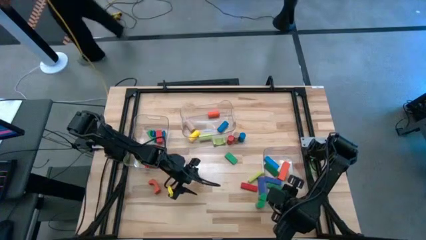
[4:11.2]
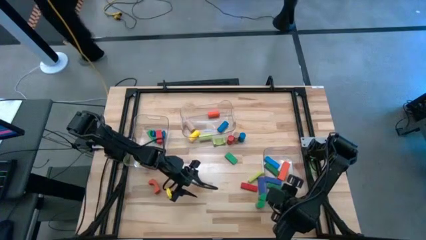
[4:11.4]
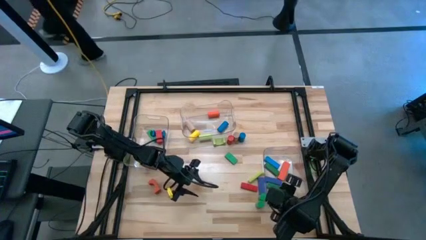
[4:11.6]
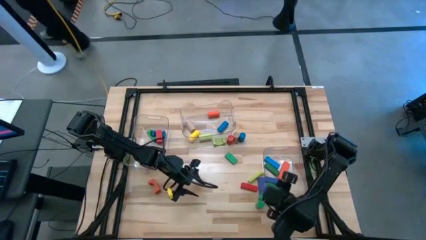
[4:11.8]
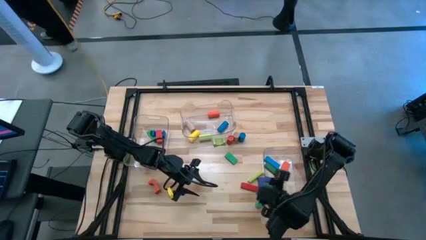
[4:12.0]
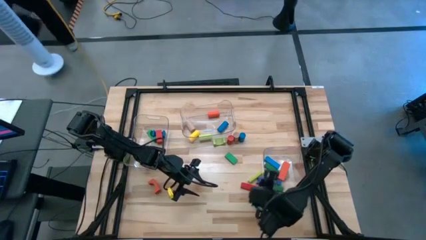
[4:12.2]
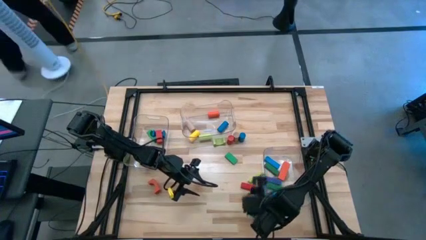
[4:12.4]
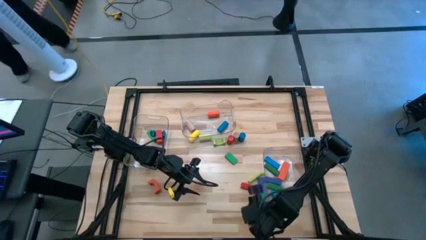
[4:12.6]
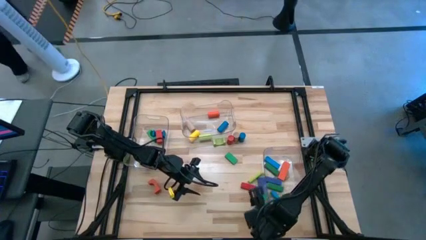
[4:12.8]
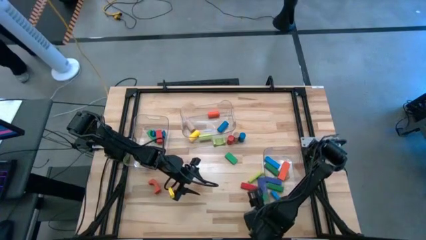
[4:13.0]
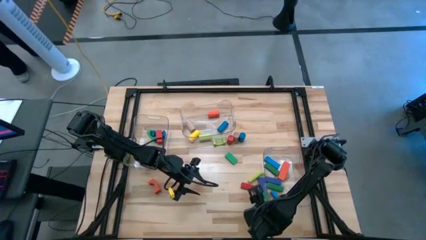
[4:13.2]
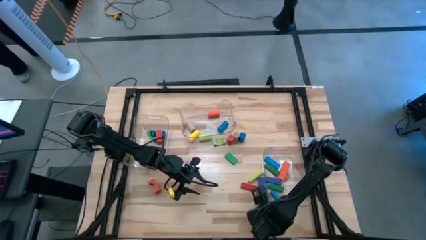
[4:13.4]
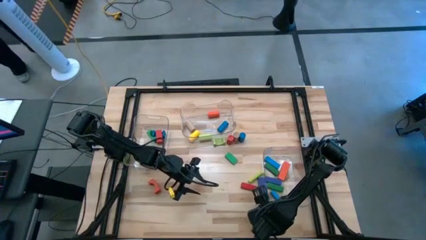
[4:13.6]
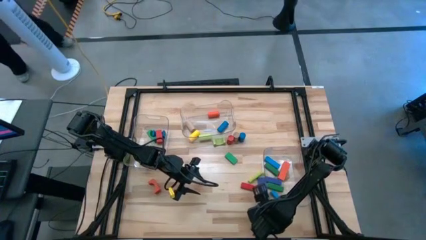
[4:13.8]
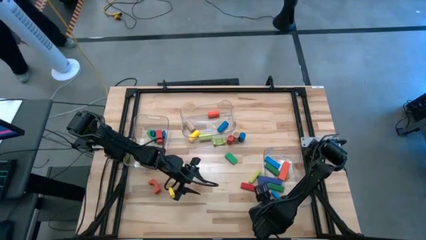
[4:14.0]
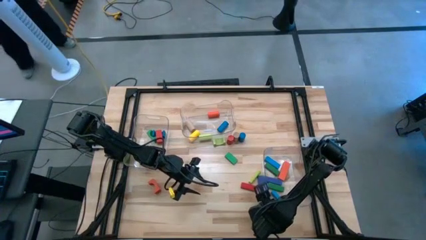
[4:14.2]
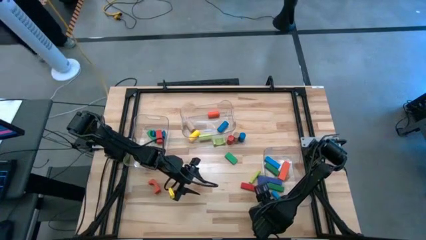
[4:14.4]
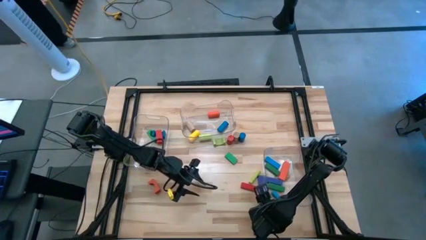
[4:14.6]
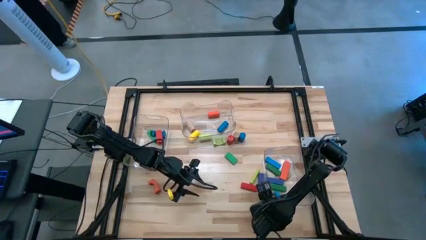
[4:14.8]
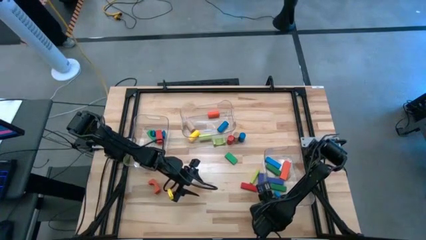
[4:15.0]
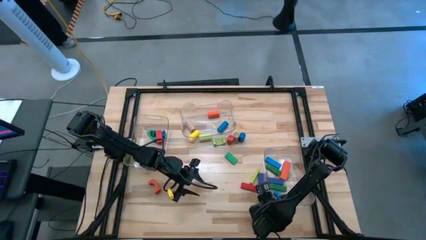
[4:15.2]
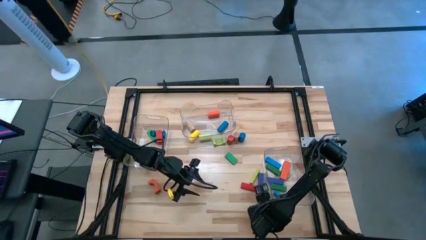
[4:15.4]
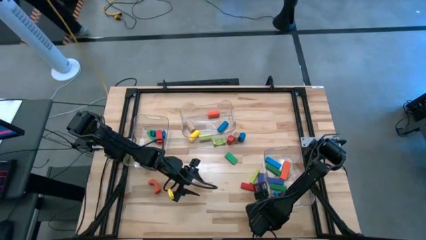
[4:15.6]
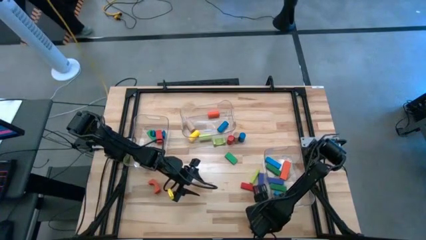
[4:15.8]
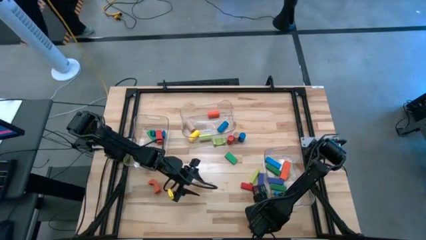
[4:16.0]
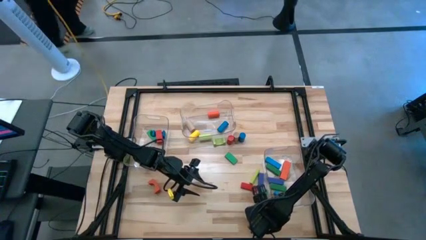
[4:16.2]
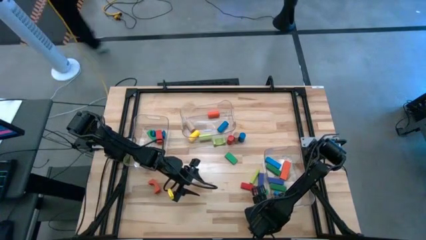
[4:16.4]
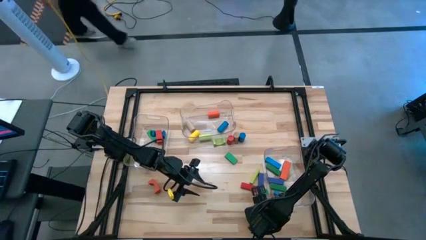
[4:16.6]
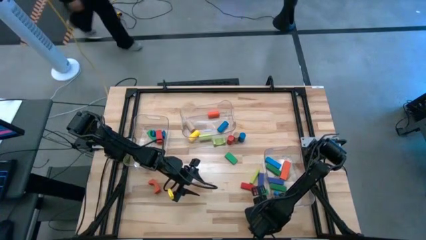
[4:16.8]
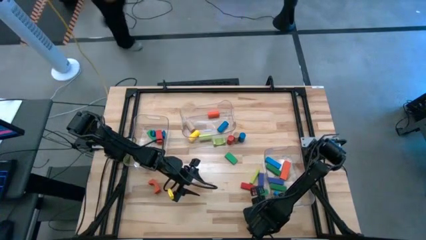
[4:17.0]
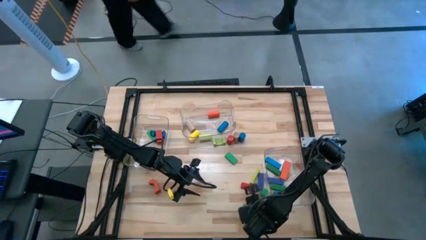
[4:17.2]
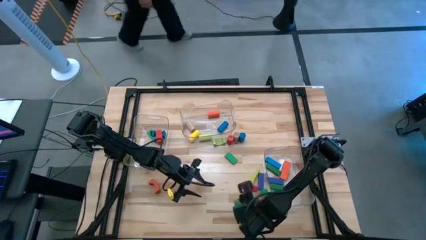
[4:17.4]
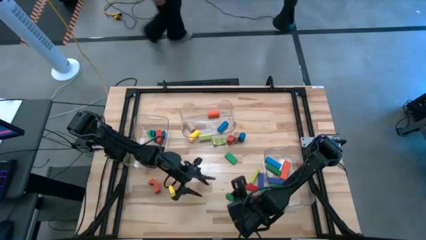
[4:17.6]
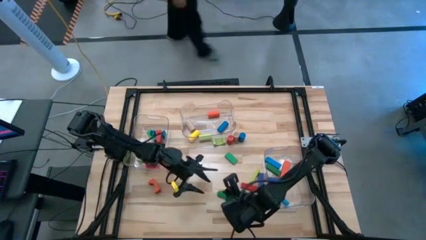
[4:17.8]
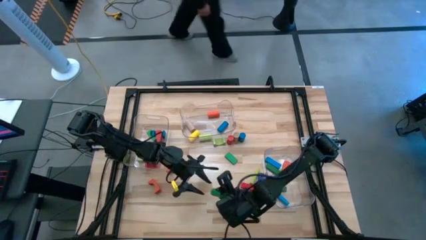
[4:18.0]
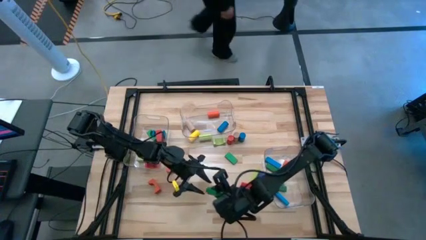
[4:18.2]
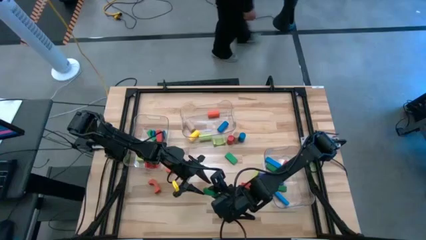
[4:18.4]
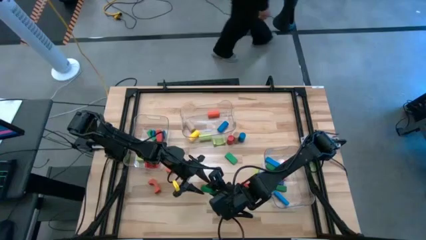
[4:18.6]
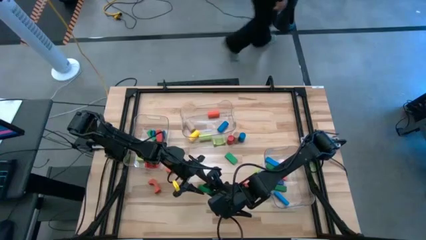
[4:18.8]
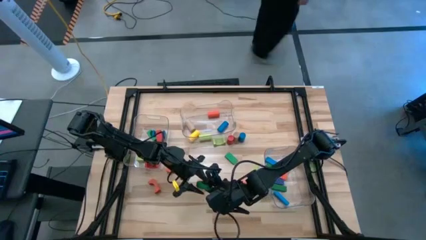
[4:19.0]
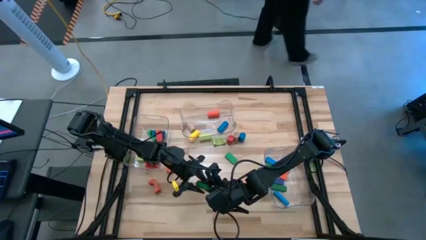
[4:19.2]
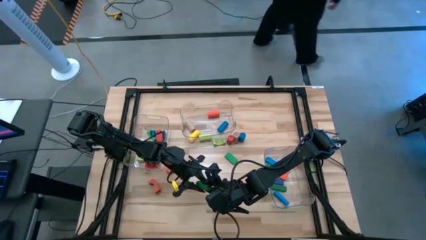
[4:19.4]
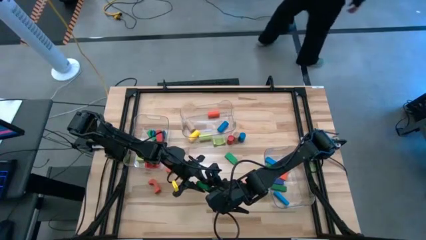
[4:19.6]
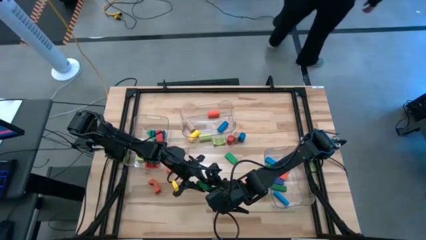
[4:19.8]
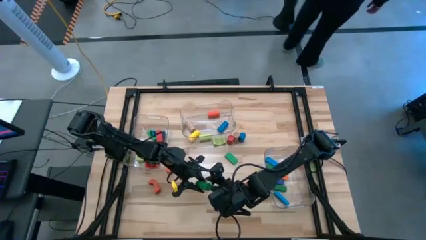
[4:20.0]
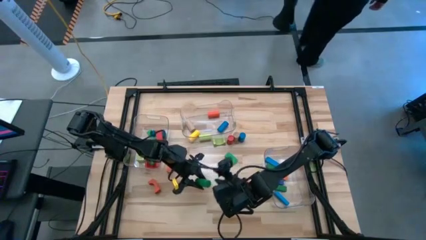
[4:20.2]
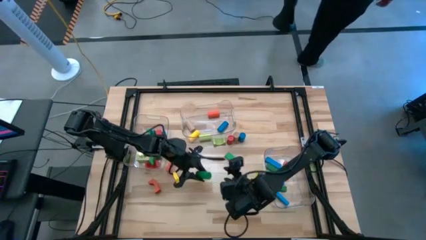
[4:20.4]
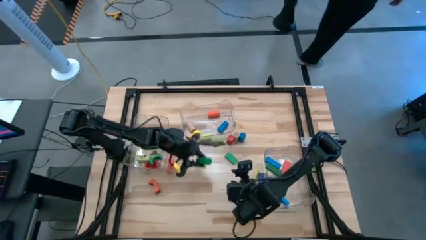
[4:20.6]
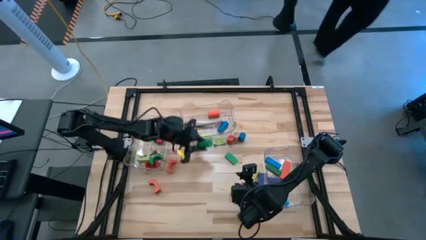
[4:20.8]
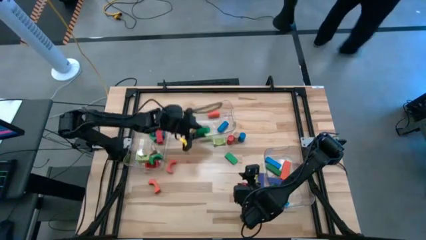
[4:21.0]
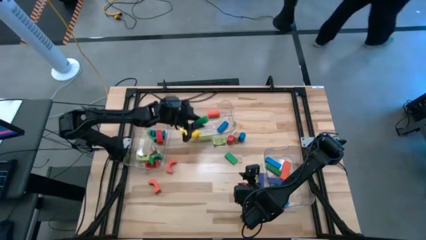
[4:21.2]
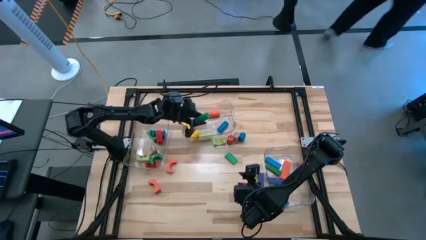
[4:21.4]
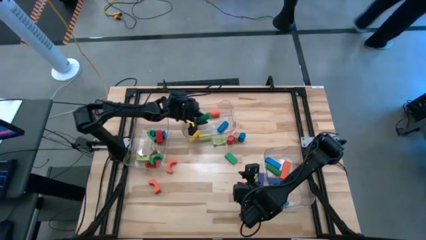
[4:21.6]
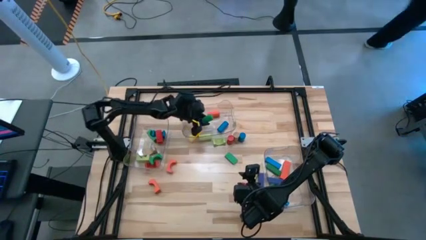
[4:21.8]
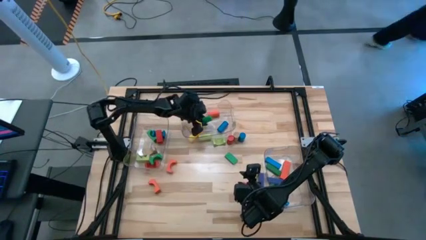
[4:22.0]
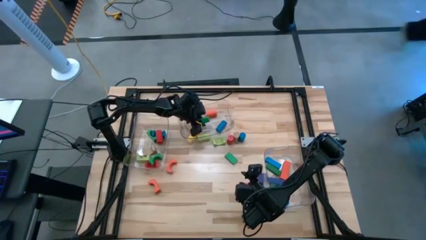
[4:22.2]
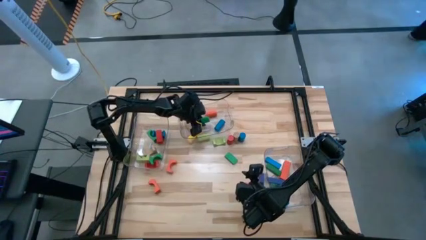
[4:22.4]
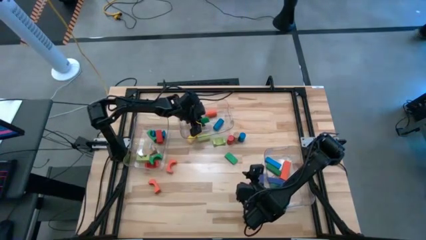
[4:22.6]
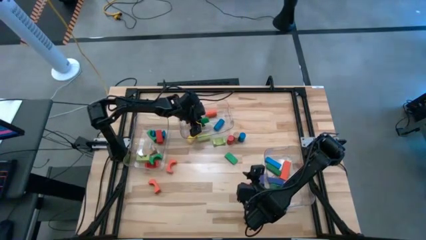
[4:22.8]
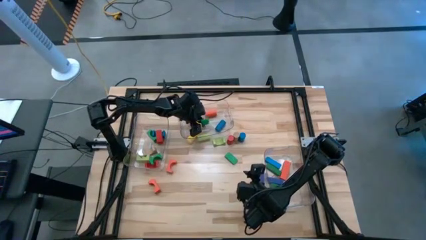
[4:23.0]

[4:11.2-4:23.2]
Task: Sort blocks by size
Put the green cylindrical block into the top transparent bin

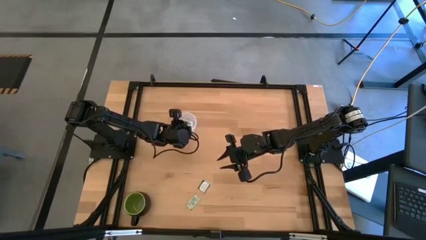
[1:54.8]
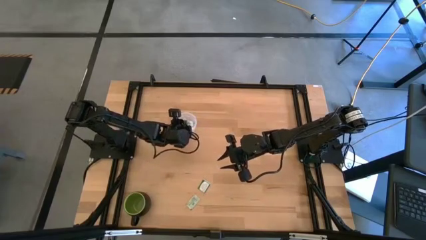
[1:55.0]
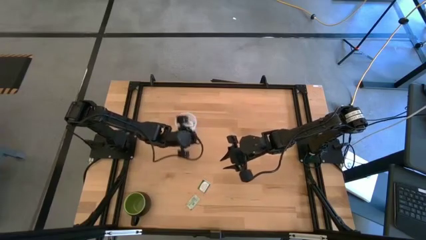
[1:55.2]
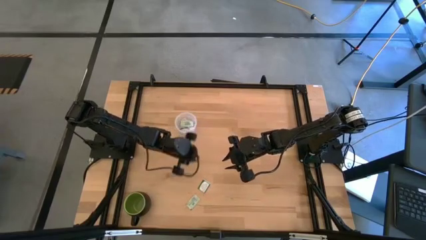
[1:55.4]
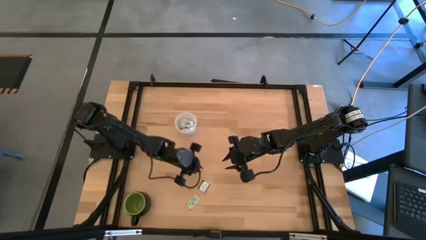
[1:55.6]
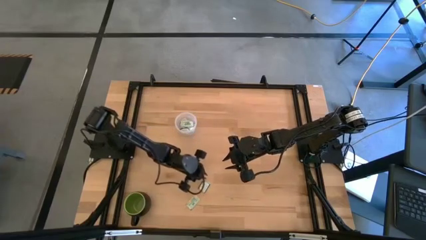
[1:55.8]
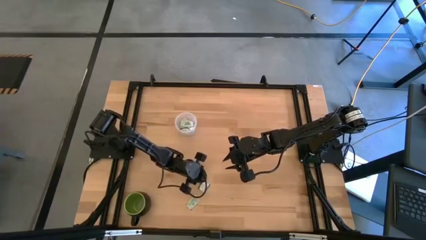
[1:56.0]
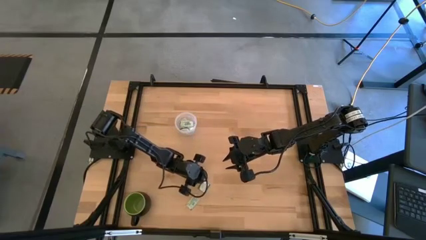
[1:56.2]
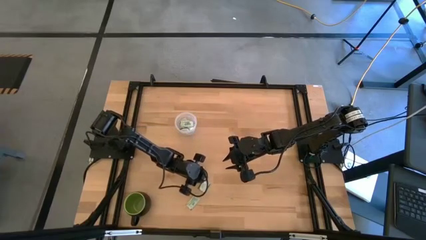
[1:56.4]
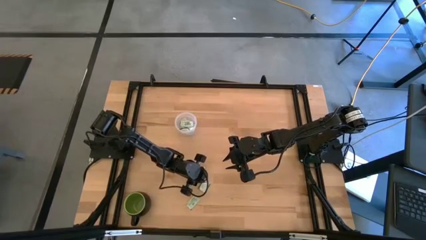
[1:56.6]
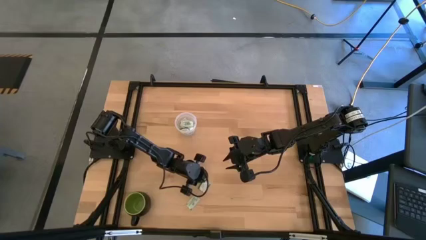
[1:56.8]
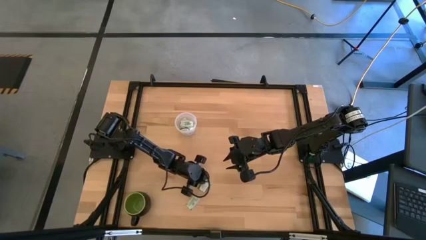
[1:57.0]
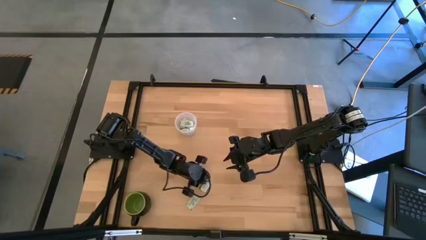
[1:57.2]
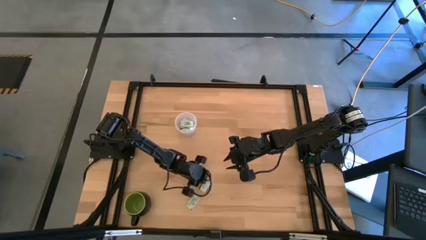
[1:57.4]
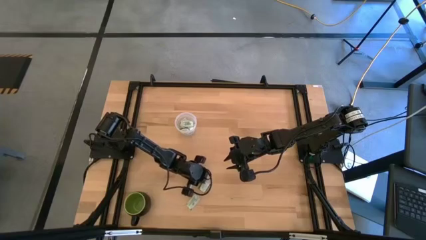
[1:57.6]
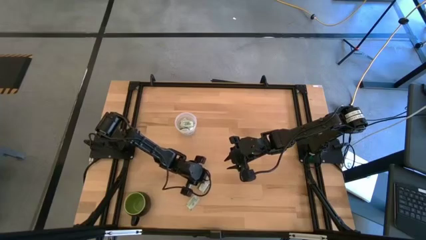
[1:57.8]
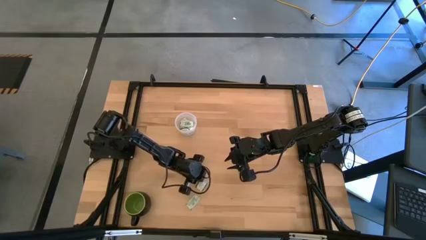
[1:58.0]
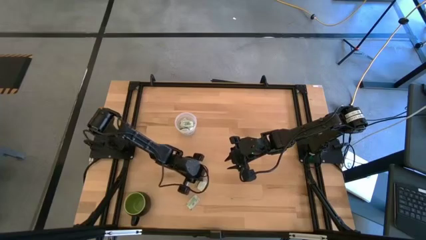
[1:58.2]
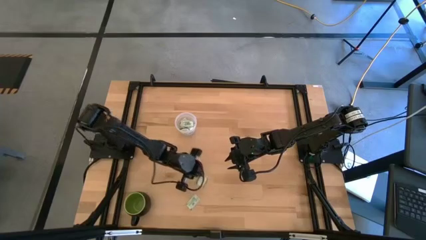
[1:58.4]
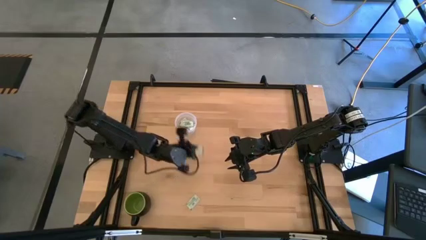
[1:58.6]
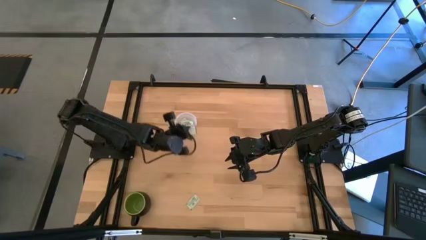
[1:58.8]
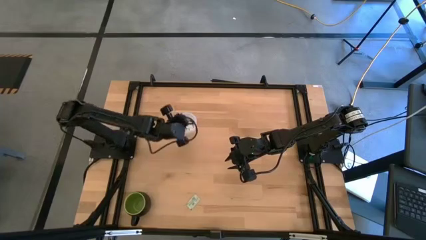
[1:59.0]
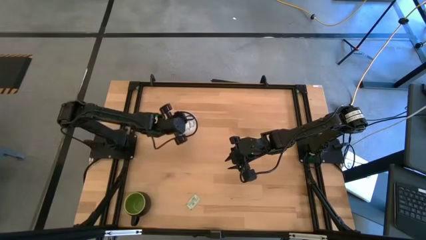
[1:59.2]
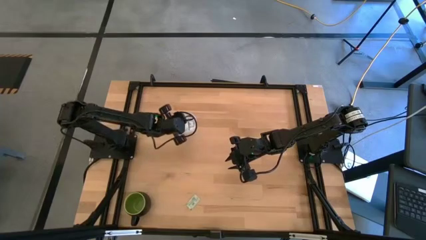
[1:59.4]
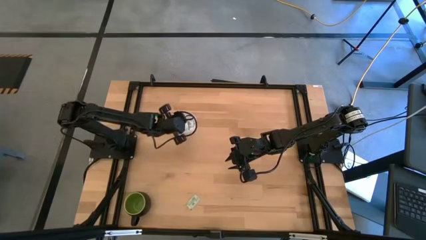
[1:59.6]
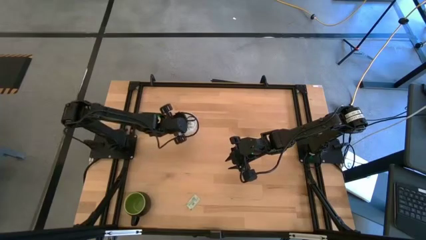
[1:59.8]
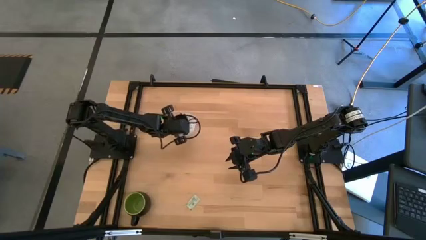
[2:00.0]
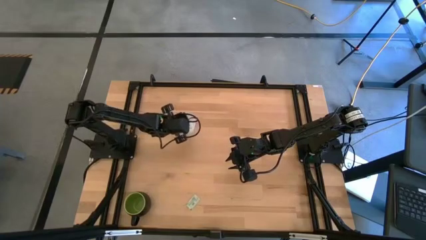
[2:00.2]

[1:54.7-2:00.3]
Task: Pick and place Stevia / Truvia into bins
Put the green stevia packet into the transparent container
